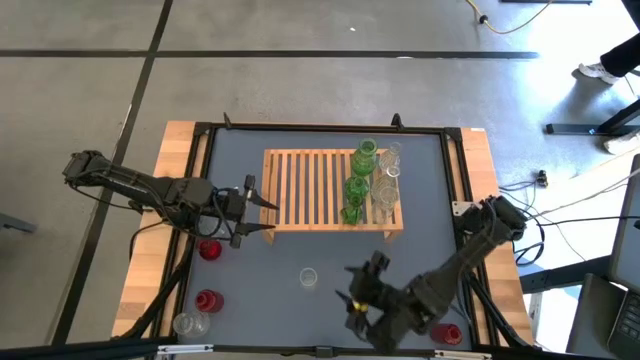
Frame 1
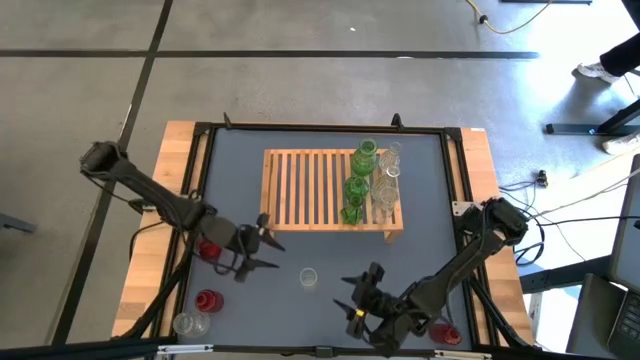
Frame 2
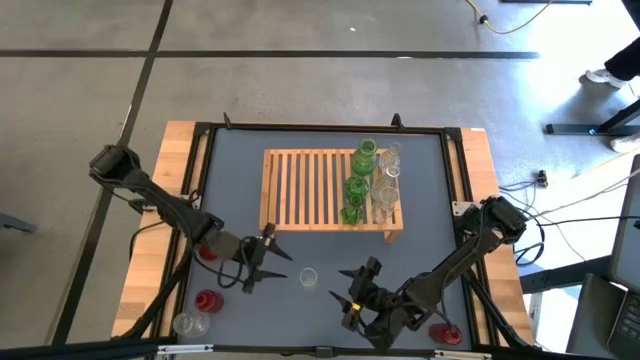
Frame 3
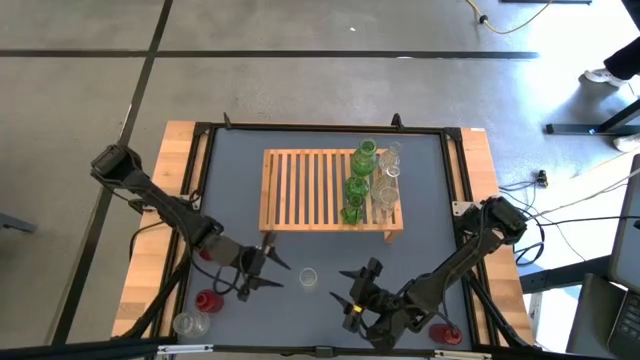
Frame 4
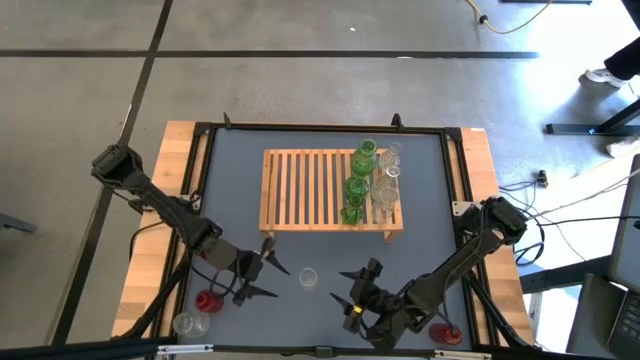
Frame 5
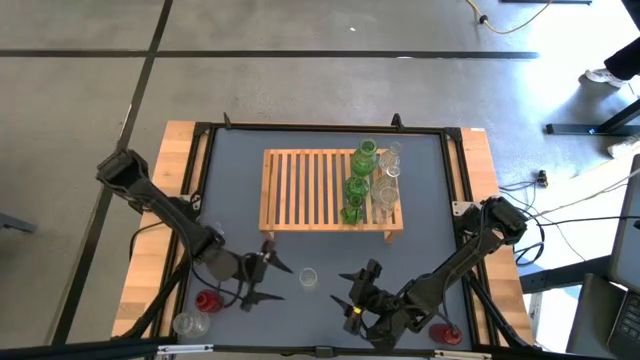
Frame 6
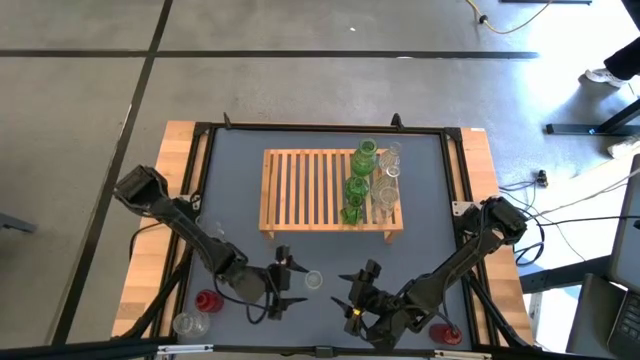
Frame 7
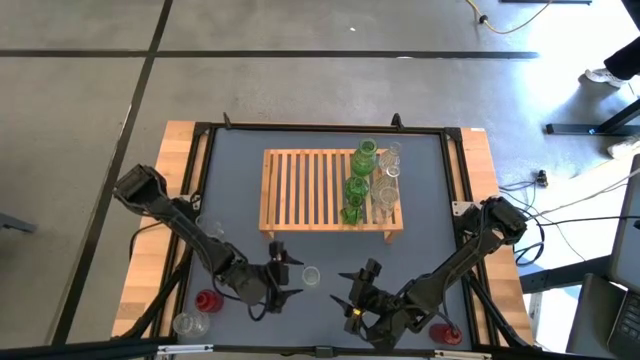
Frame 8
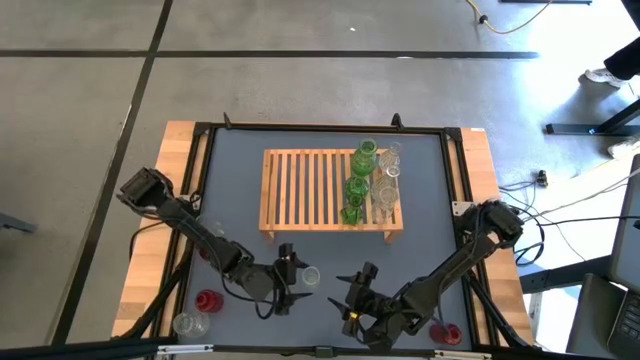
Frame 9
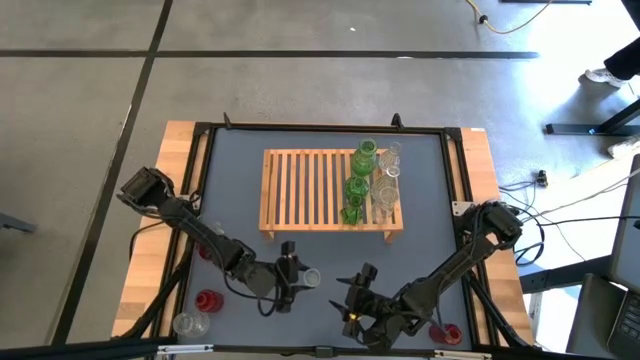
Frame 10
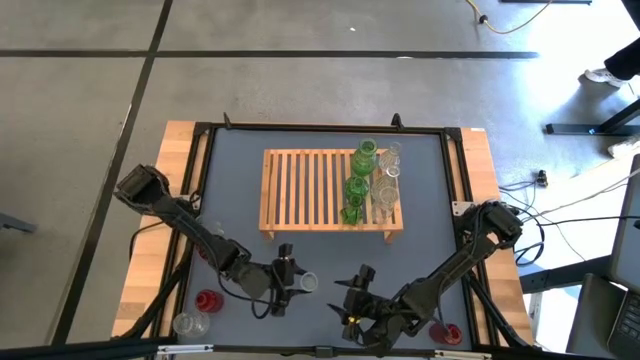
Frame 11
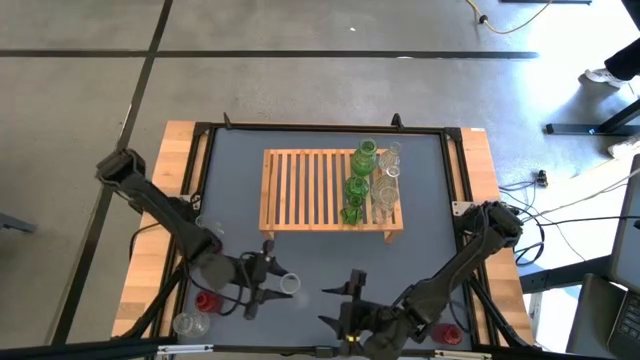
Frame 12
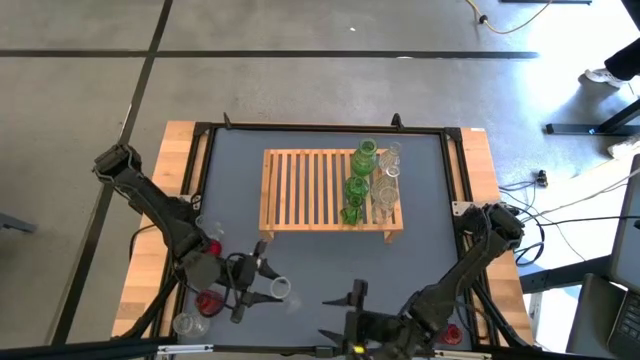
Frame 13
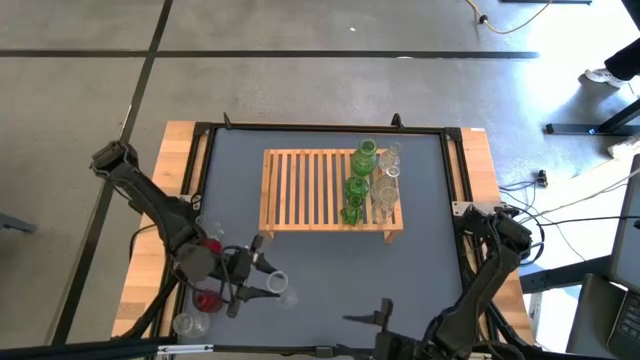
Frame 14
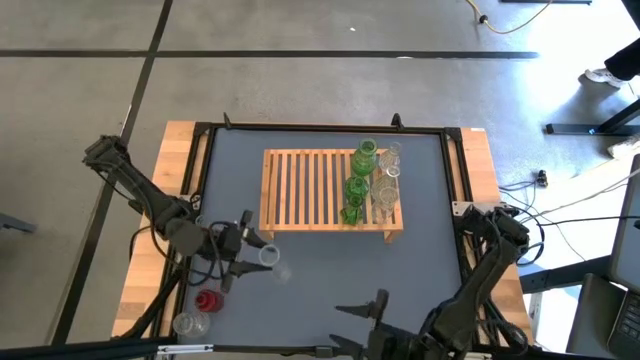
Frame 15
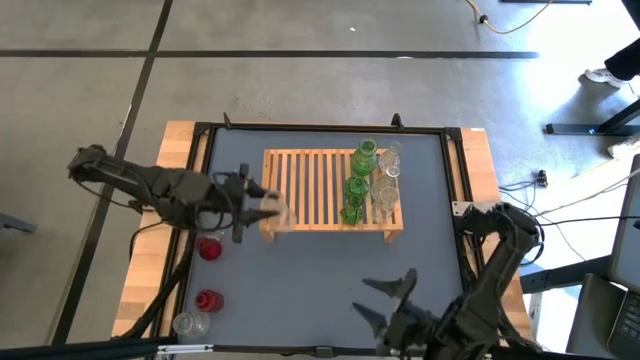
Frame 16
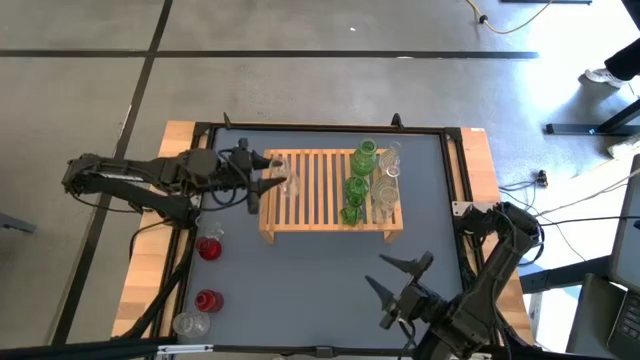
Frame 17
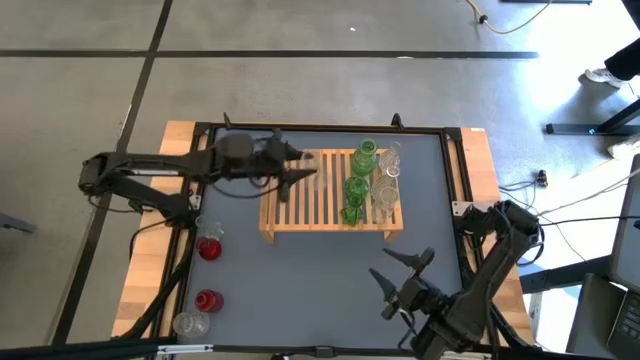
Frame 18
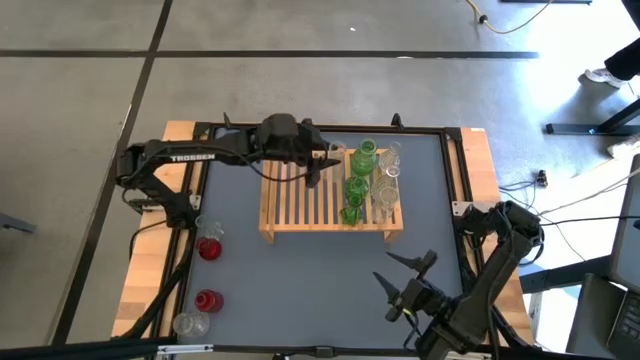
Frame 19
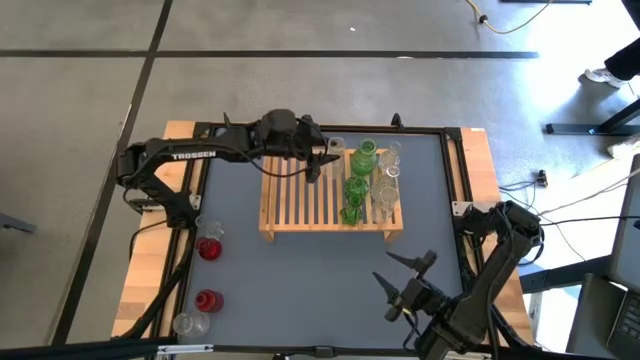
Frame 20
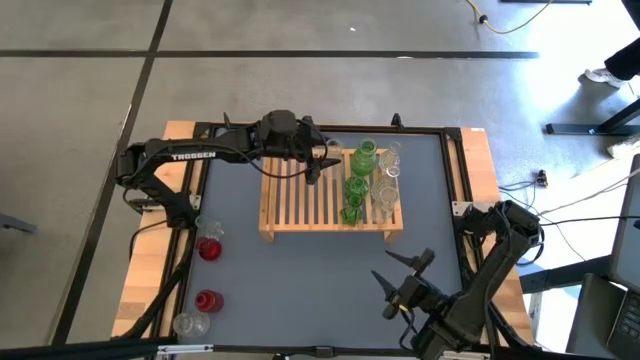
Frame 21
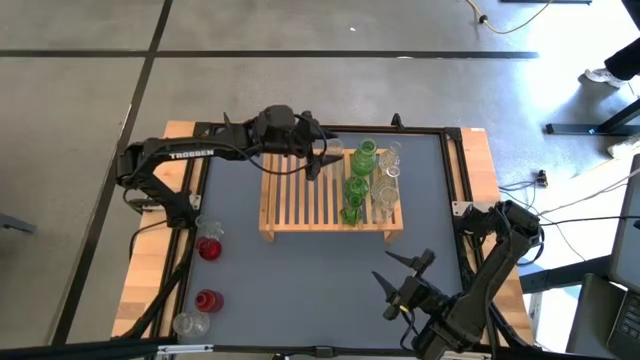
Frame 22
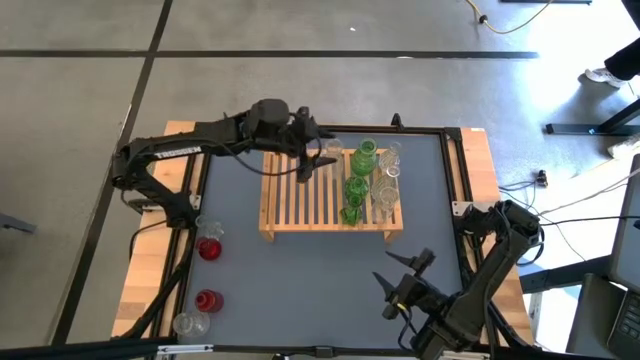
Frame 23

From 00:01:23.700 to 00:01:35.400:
Task: sort vases onto shelf
Put the transparent bottle on the shelf

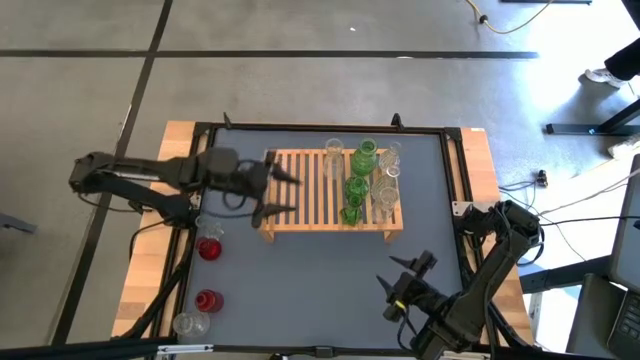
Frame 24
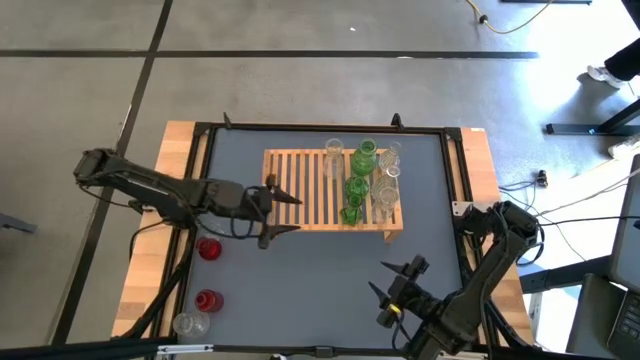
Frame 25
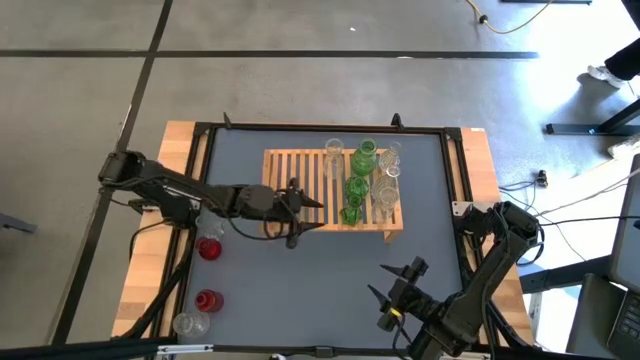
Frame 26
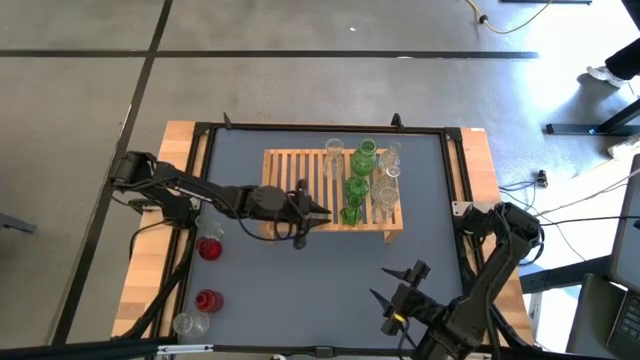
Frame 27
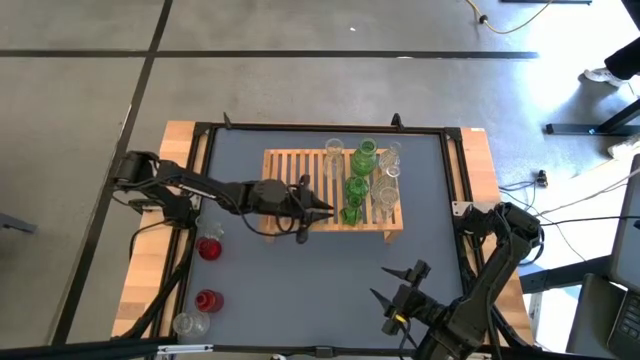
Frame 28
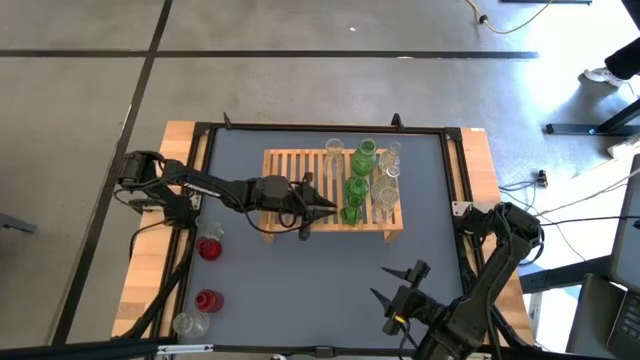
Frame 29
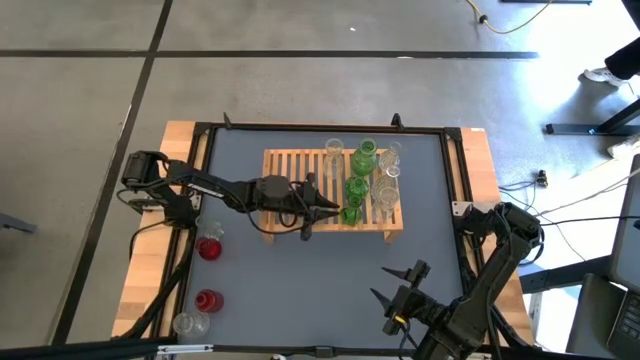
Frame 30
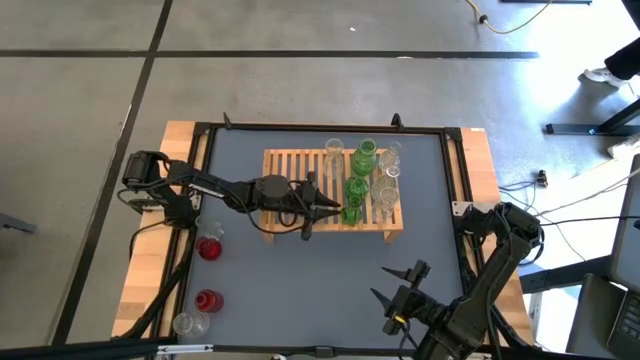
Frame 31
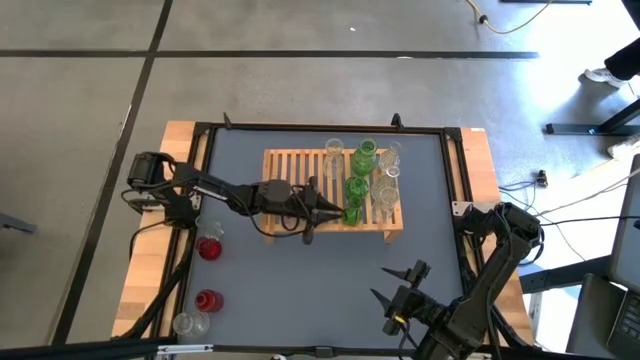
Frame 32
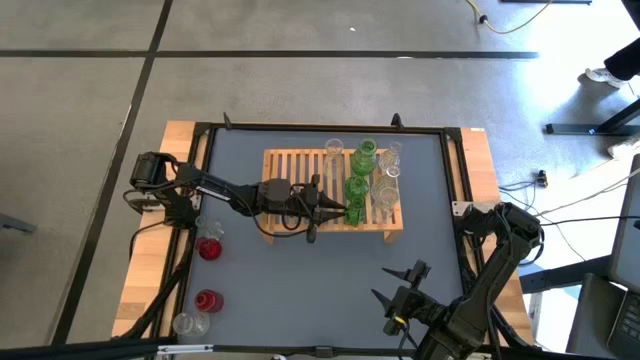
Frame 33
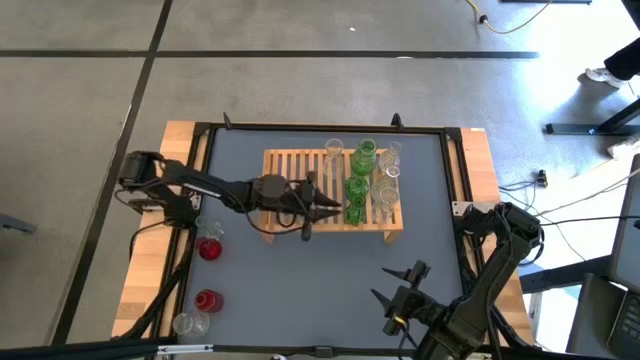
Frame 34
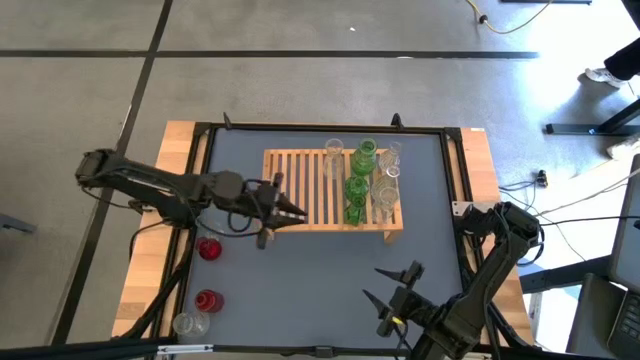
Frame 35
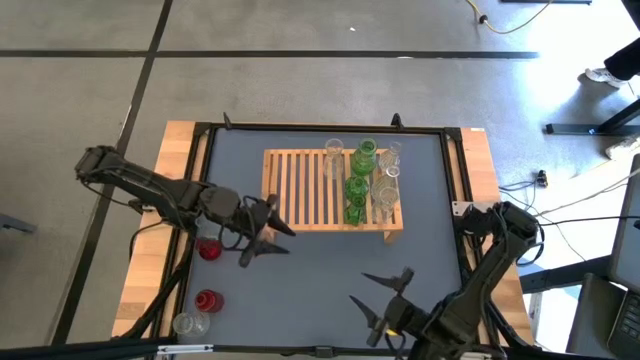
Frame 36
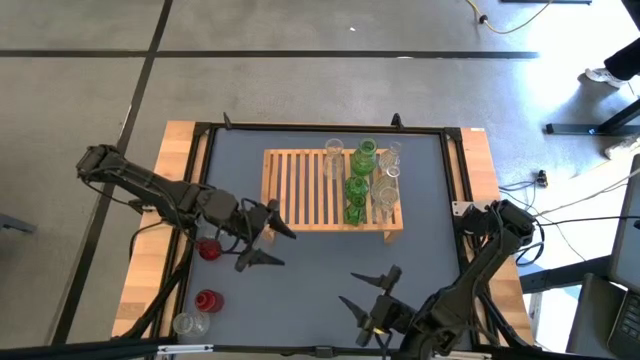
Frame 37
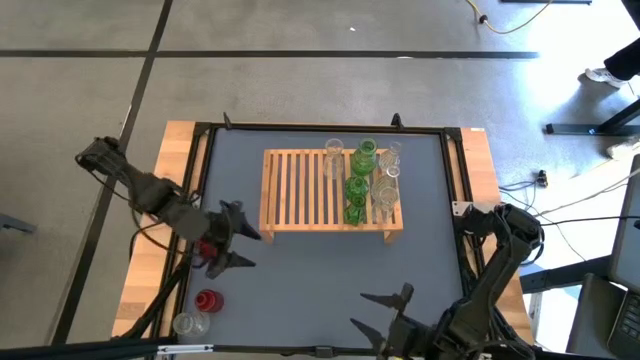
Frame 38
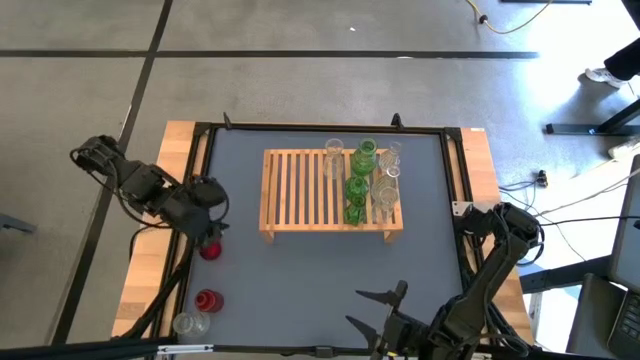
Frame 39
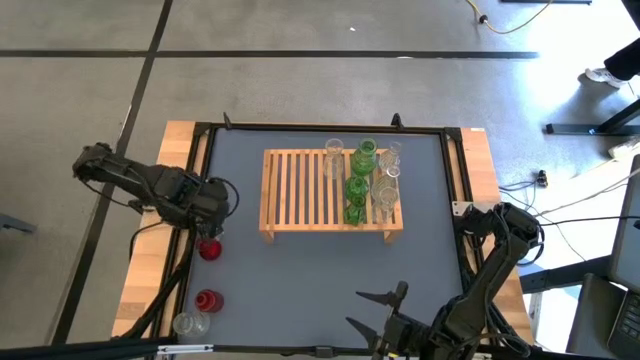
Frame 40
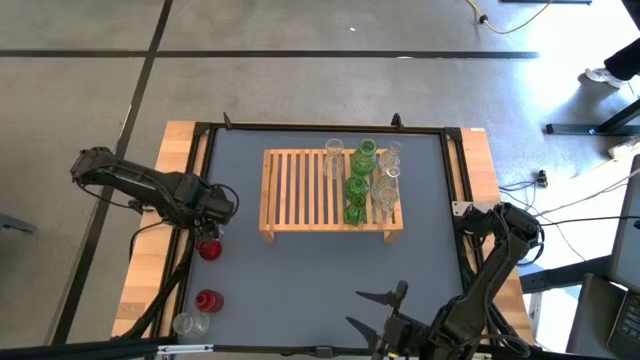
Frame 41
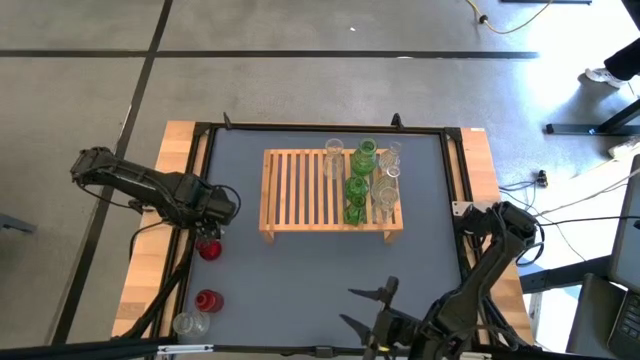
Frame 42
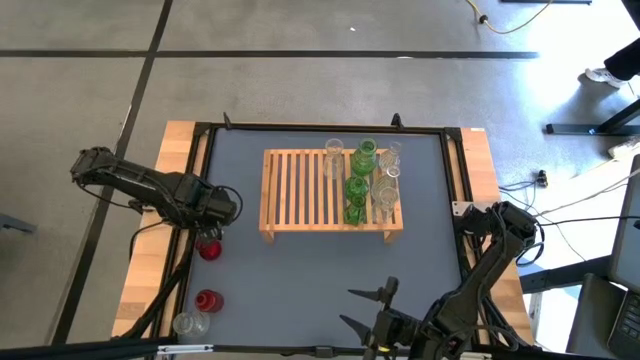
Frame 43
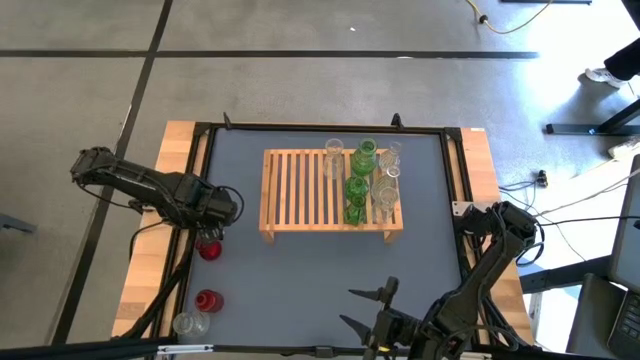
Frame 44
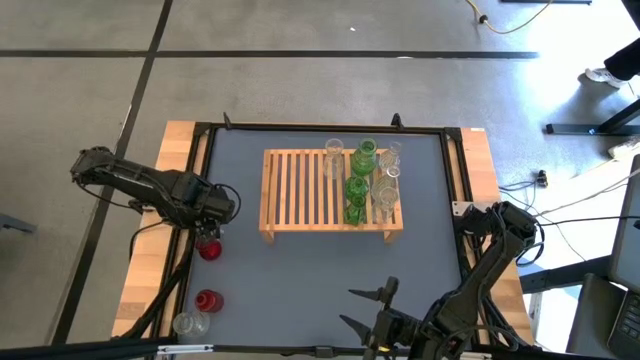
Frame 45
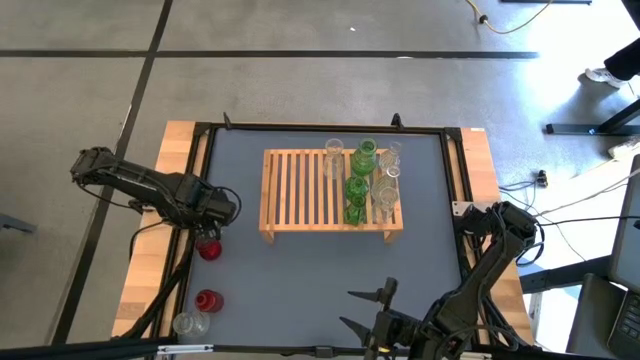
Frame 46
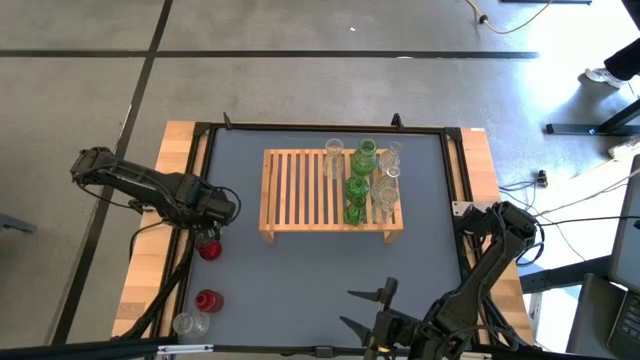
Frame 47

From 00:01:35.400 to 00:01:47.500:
Put the transparent bottle on the shelf
